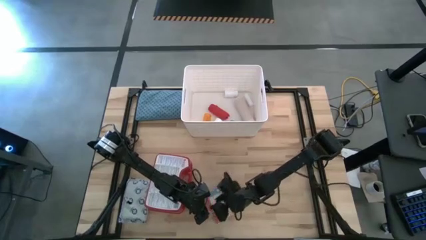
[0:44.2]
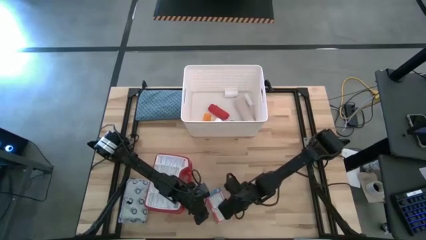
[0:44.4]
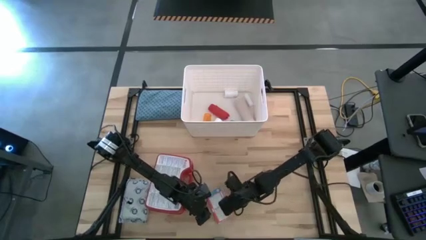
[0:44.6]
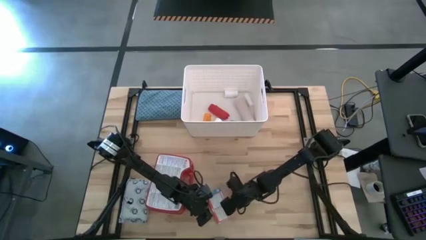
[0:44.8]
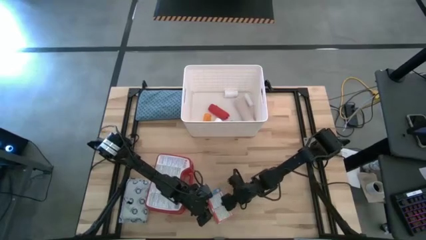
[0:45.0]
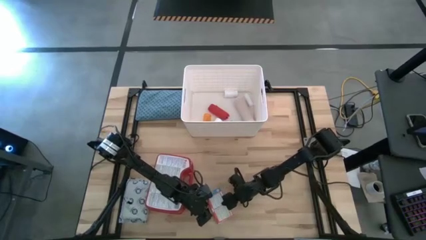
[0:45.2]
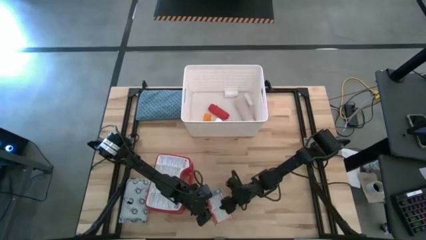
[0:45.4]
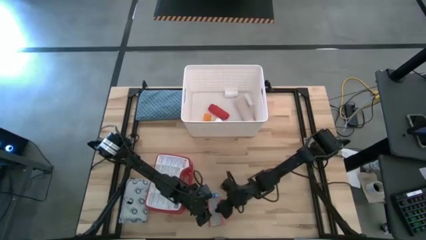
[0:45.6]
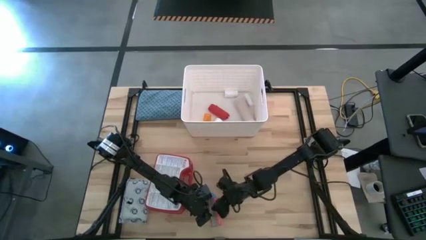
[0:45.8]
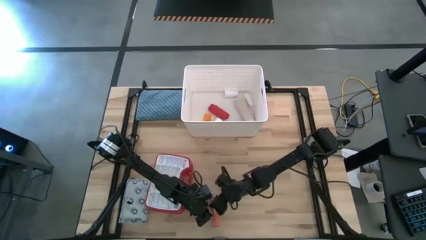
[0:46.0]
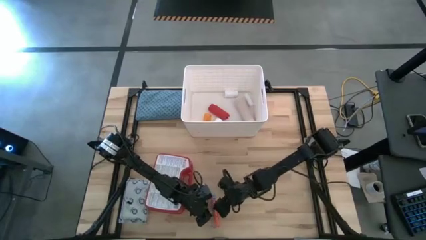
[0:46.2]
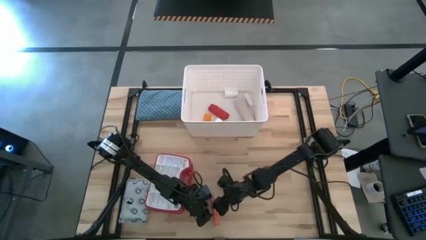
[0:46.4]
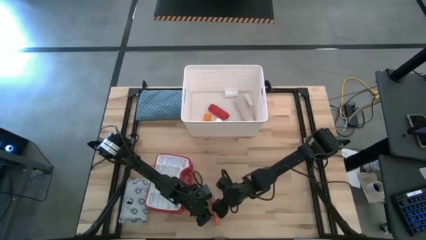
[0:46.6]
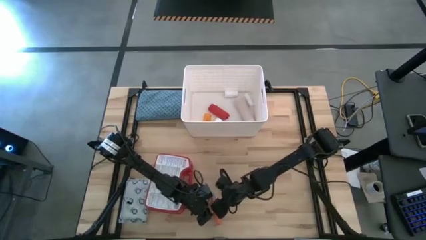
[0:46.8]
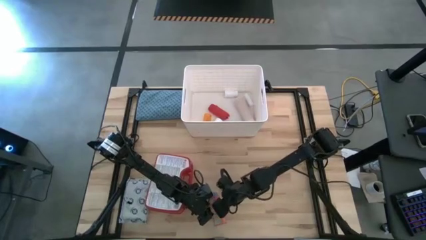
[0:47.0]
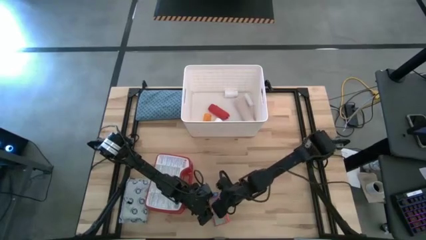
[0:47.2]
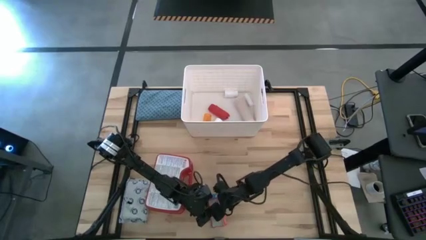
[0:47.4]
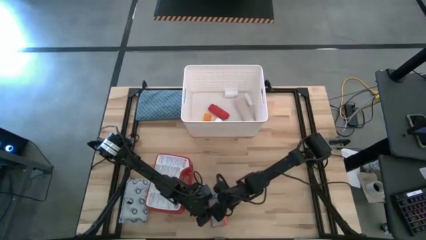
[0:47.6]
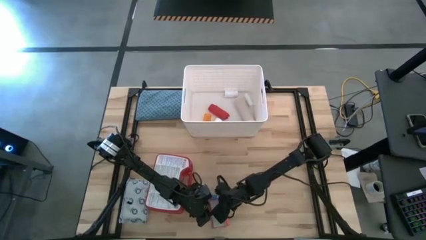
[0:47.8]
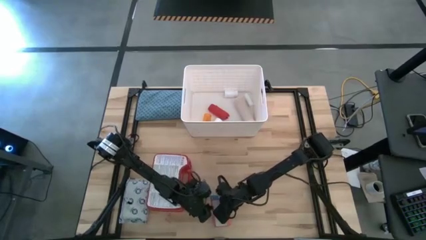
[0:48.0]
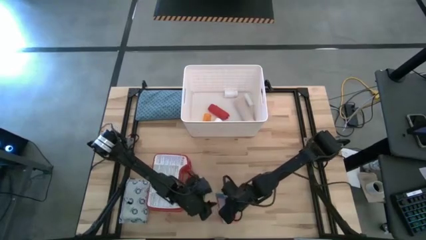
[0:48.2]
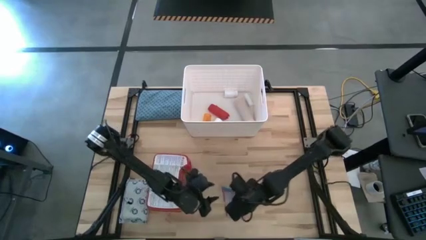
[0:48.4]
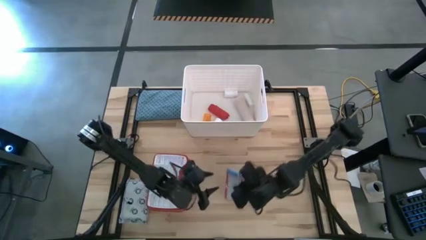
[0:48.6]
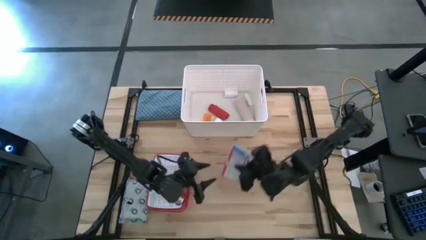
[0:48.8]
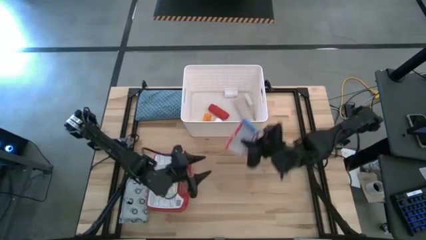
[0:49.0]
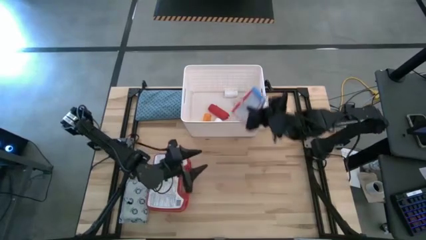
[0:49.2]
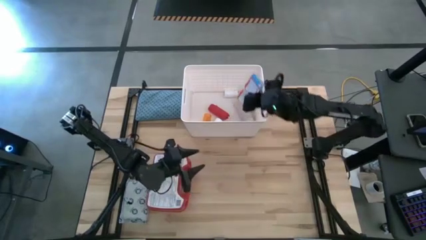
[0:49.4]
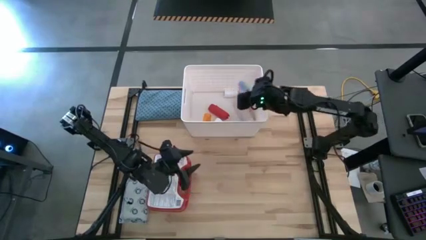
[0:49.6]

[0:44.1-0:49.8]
Task: Pick & place medical supplies in basket/bin
Put the red medicine box into the white bin

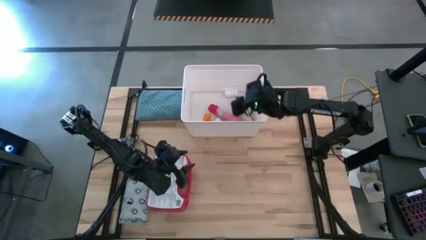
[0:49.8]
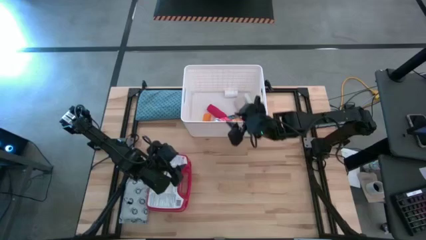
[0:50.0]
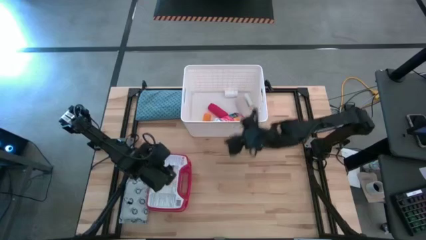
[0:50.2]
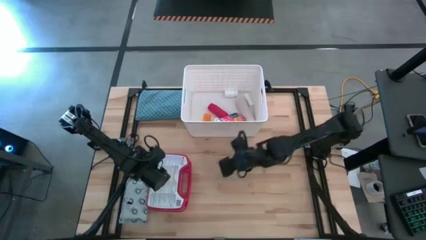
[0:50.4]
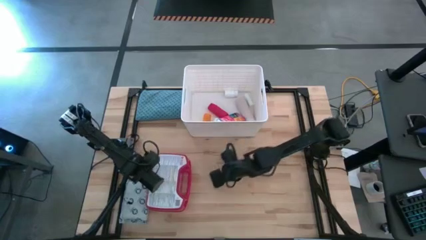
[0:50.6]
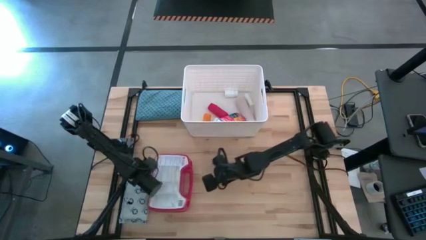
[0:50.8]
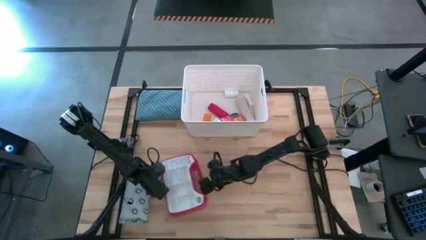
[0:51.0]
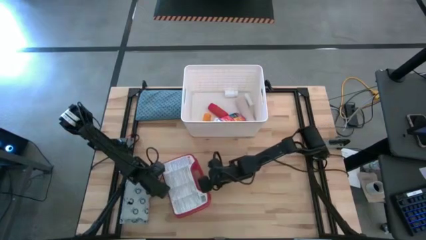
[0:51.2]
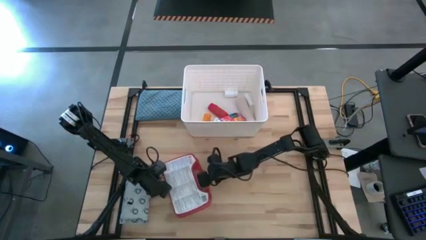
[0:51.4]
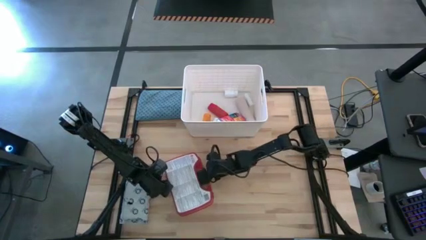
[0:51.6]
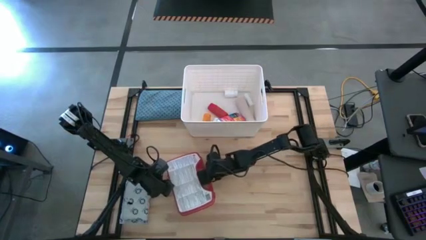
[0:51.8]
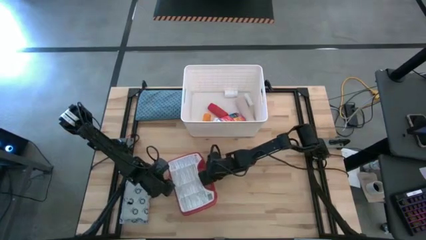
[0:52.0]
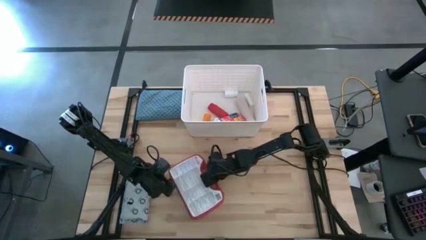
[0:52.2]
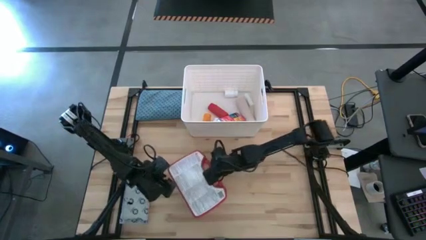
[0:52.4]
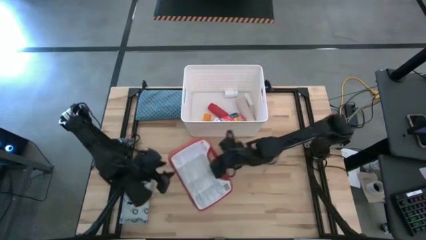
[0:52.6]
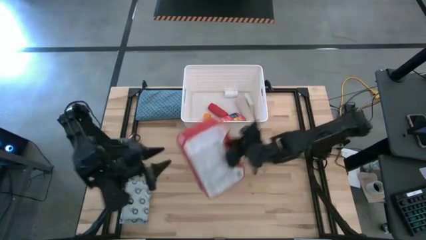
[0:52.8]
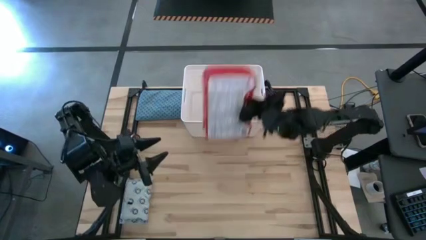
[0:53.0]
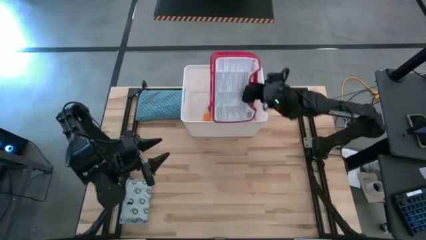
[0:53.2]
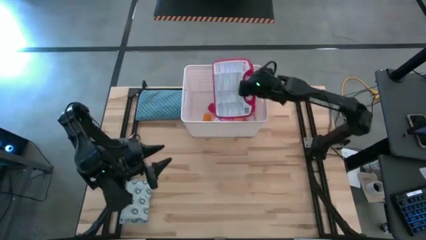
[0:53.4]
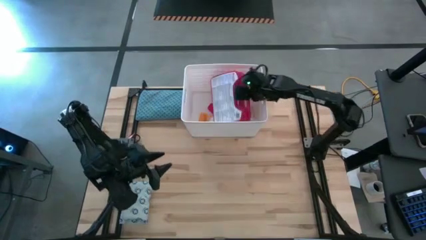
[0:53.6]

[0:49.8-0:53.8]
Put the red medicine kit into the white bin

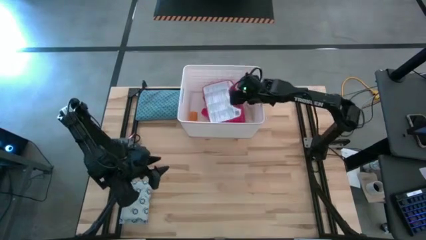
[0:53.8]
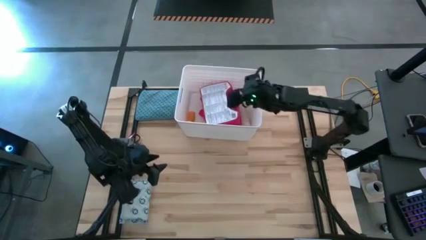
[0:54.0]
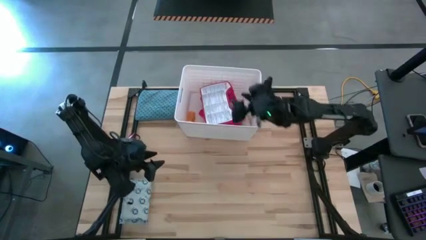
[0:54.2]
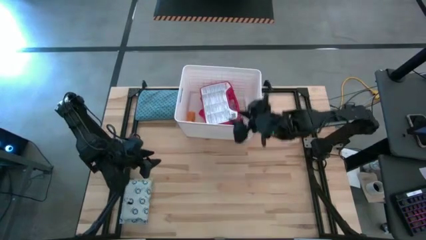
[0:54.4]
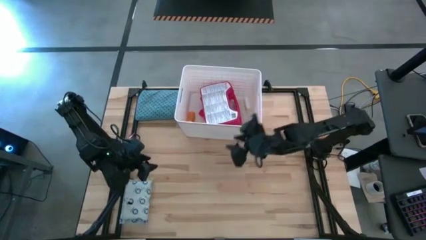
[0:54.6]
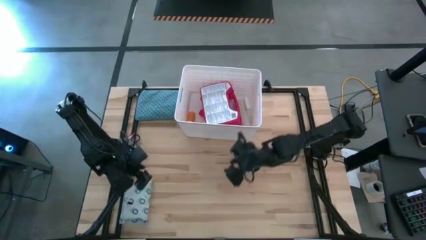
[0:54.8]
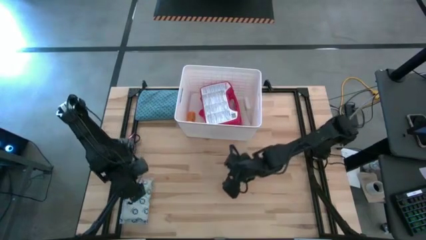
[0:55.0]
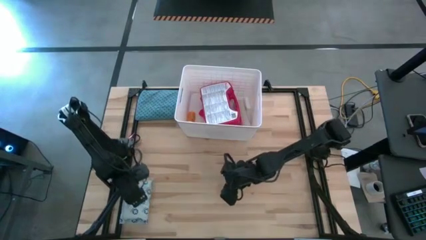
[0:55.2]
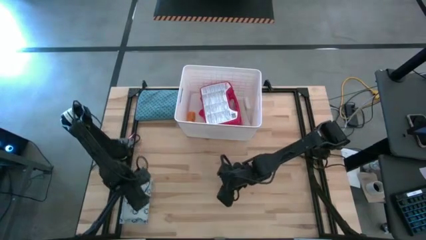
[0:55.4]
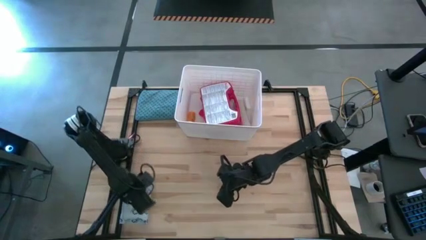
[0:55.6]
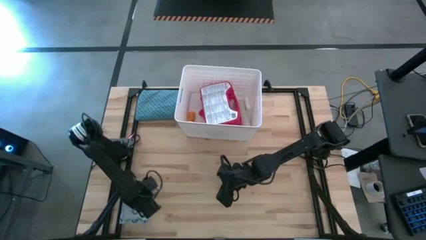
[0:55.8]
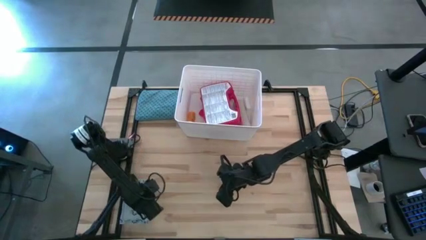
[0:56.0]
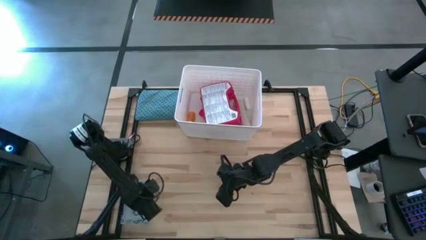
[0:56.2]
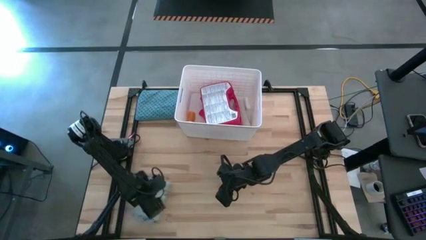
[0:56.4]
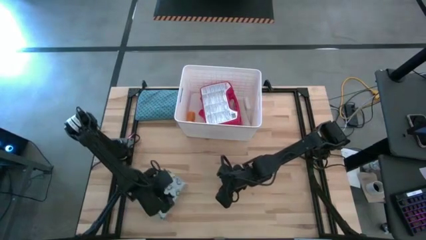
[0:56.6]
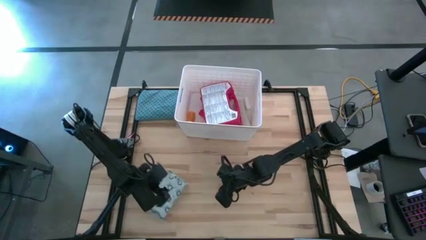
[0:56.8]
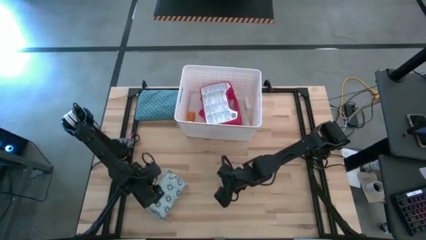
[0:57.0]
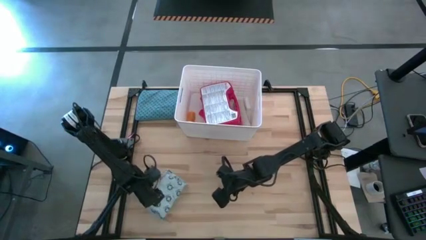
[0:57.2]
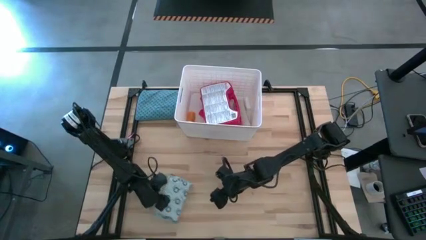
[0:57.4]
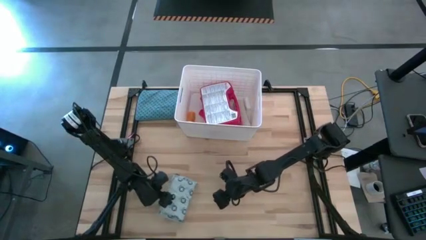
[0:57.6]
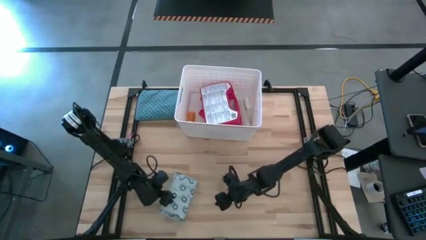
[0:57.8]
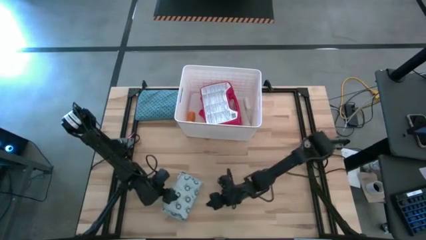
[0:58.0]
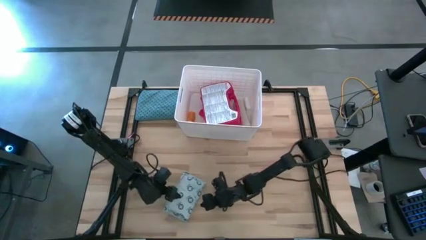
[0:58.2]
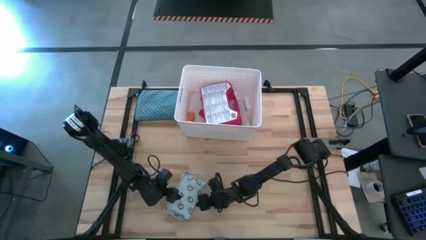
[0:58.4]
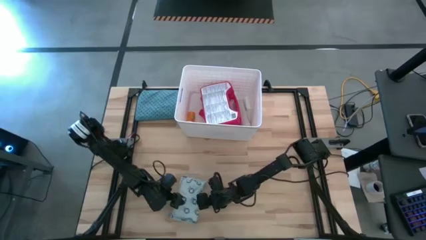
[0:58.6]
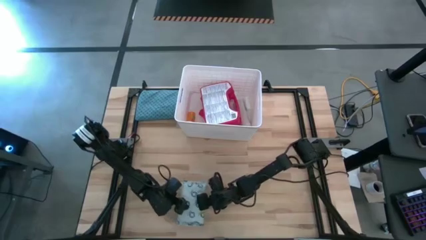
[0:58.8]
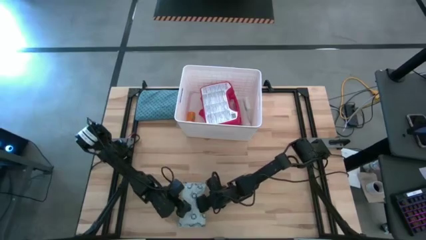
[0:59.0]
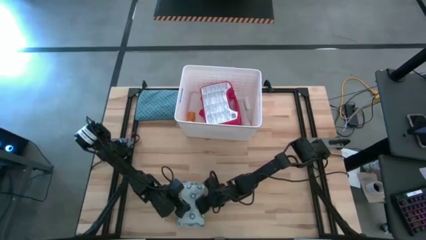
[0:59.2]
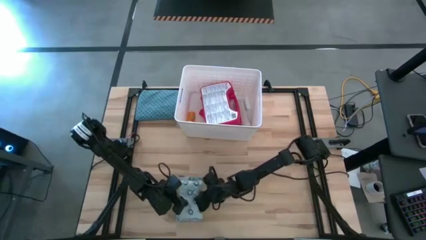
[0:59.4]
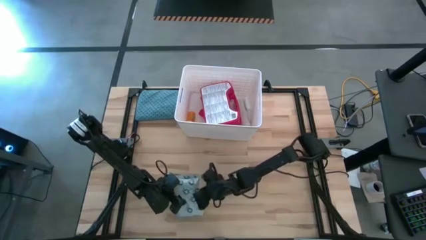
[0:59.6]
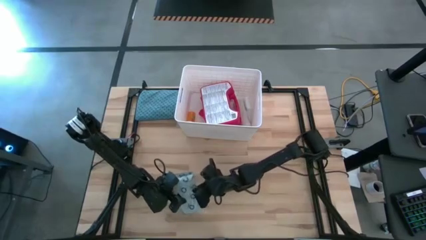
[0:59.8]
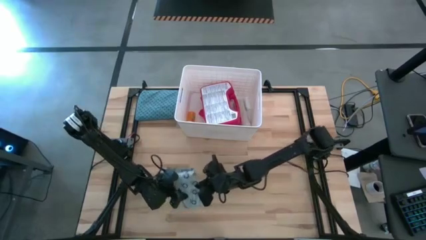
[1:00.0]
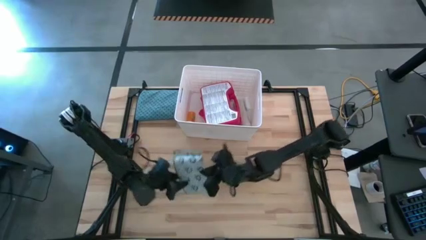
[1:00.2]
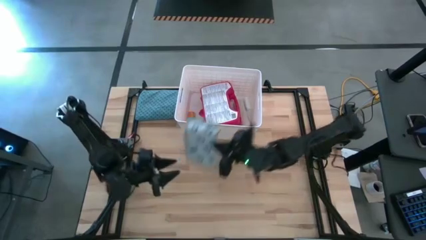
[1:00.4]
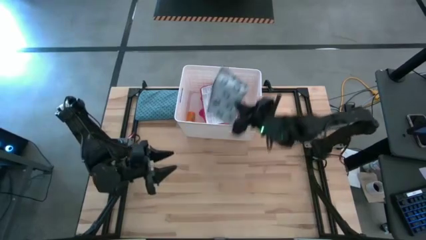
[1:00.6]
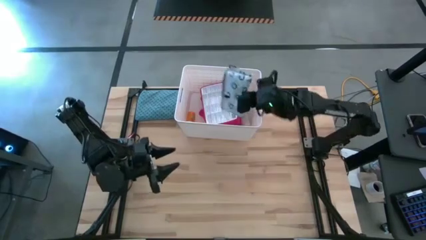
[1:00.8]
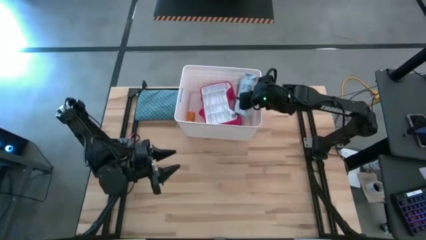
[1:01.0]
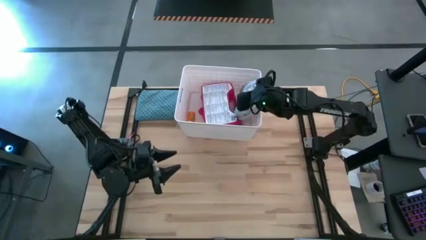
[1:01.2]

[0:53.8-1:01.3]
Put the blue pads into the white bin
